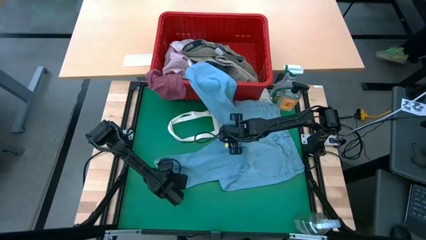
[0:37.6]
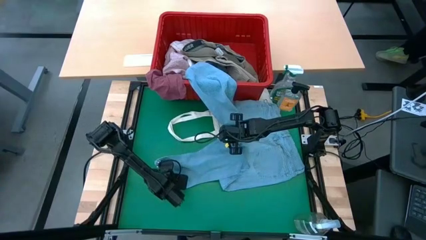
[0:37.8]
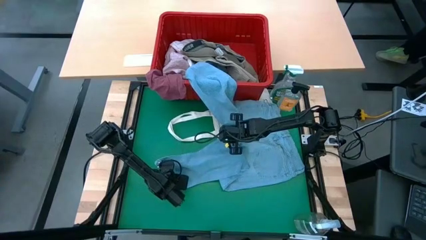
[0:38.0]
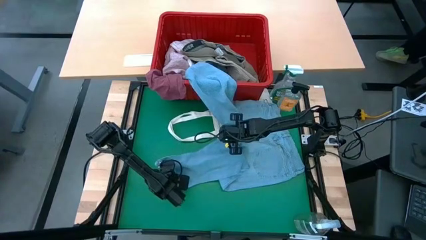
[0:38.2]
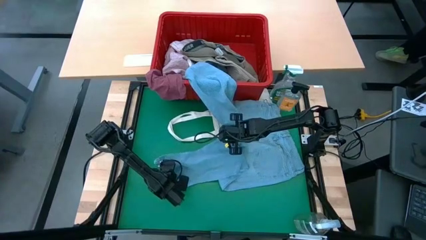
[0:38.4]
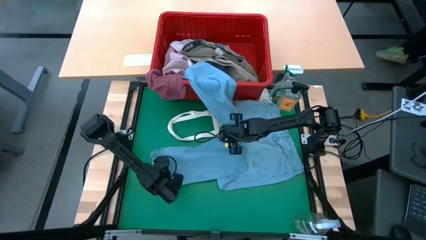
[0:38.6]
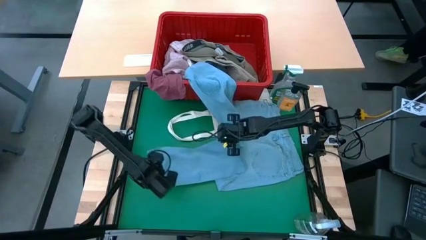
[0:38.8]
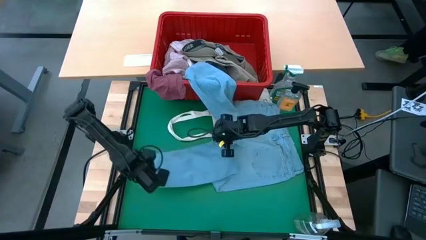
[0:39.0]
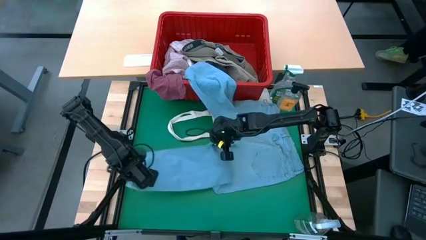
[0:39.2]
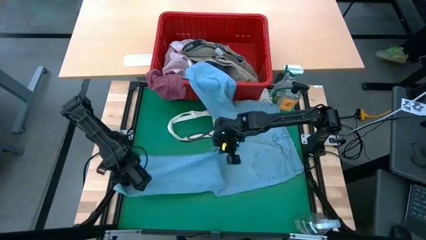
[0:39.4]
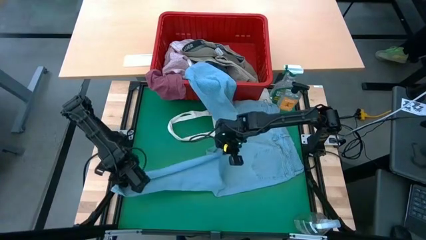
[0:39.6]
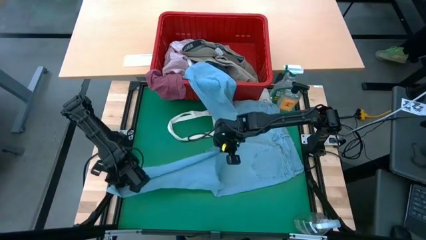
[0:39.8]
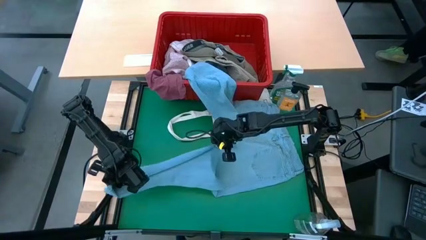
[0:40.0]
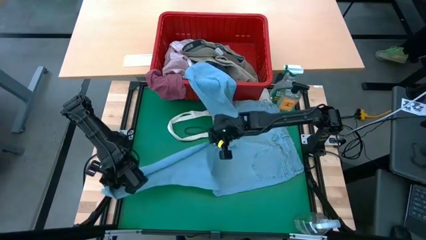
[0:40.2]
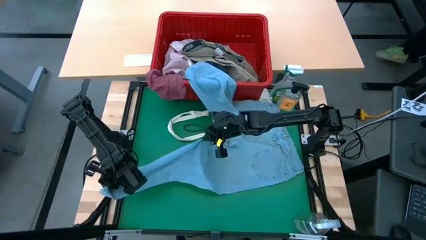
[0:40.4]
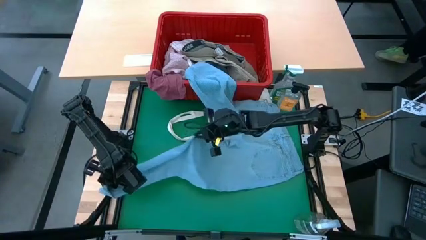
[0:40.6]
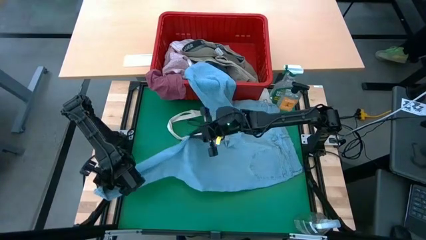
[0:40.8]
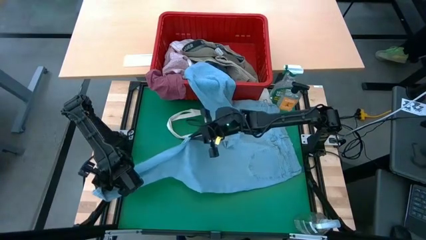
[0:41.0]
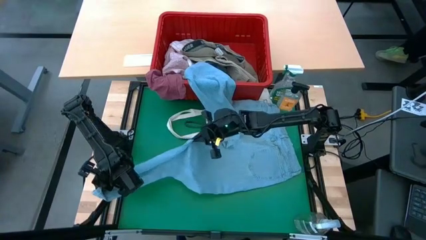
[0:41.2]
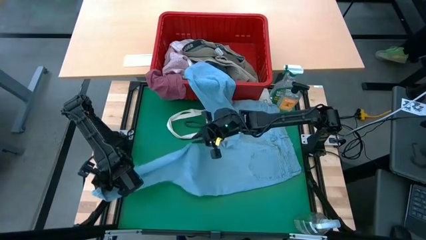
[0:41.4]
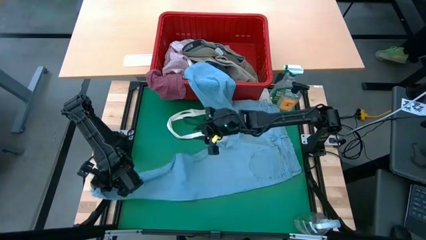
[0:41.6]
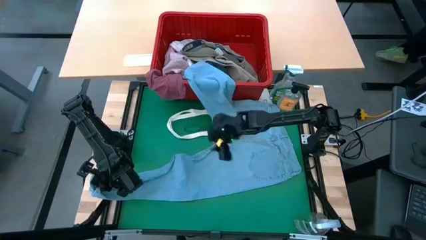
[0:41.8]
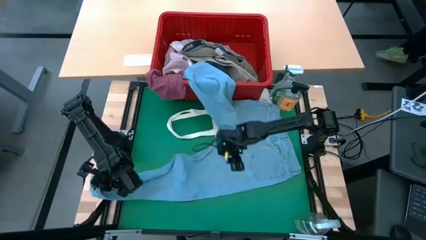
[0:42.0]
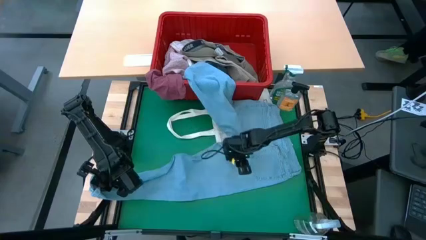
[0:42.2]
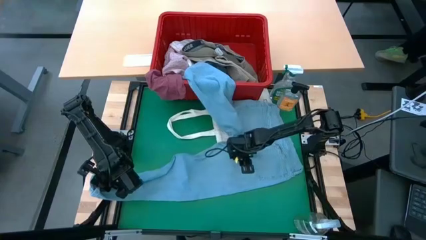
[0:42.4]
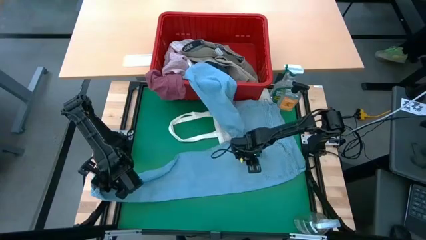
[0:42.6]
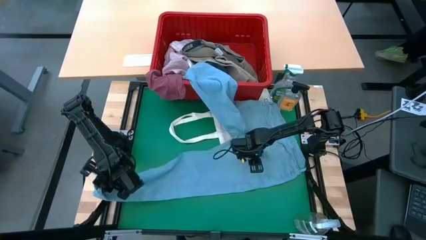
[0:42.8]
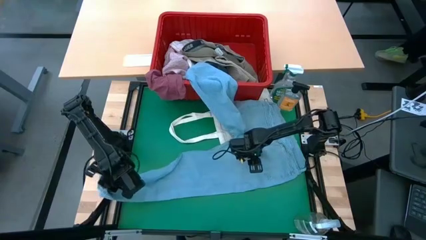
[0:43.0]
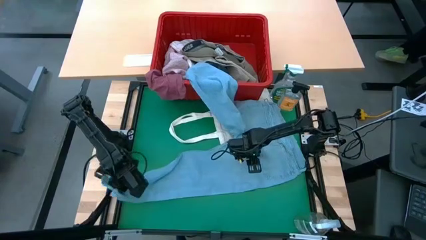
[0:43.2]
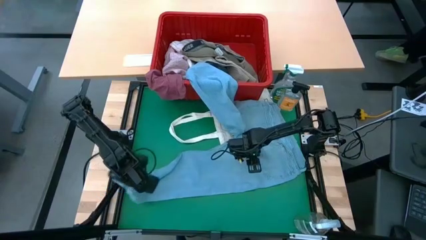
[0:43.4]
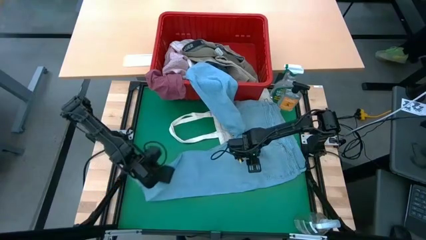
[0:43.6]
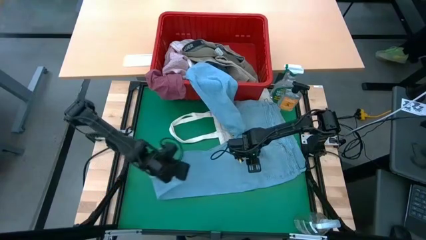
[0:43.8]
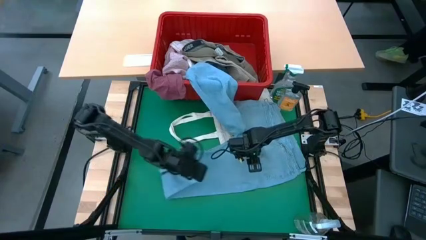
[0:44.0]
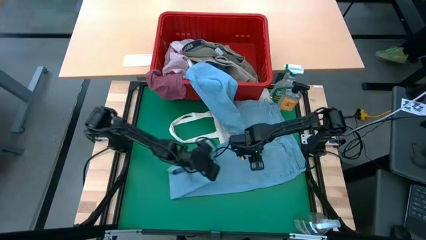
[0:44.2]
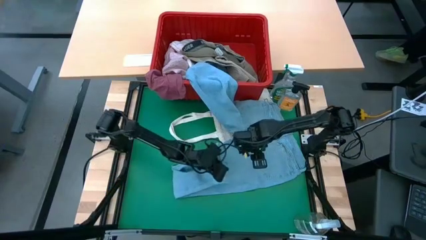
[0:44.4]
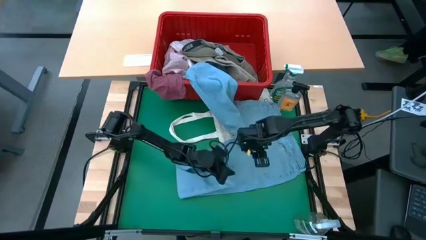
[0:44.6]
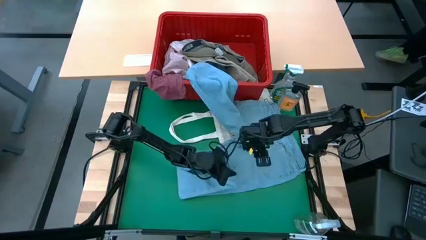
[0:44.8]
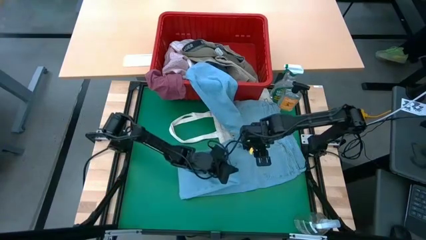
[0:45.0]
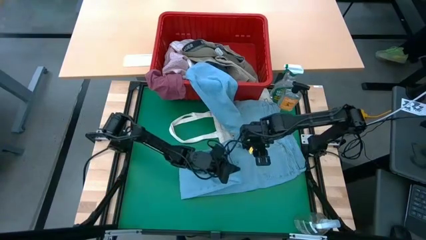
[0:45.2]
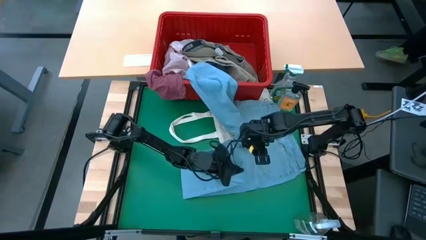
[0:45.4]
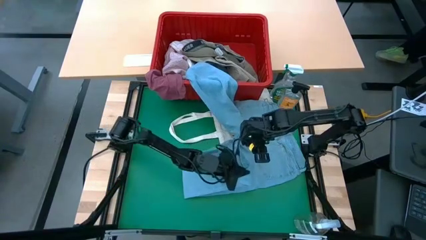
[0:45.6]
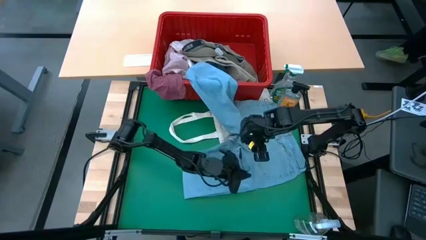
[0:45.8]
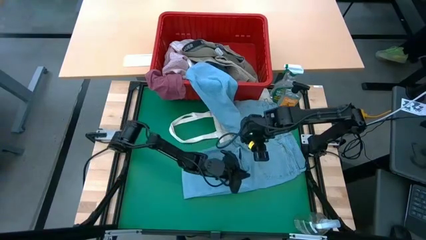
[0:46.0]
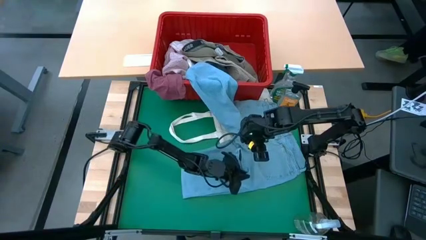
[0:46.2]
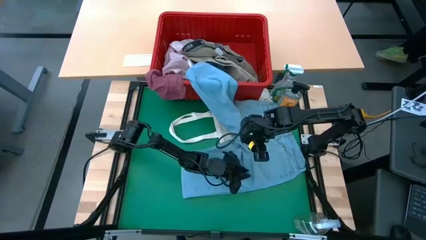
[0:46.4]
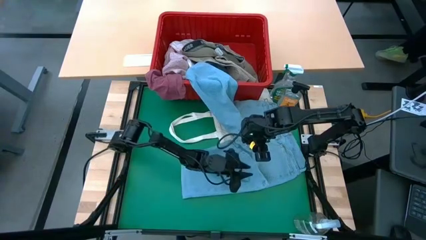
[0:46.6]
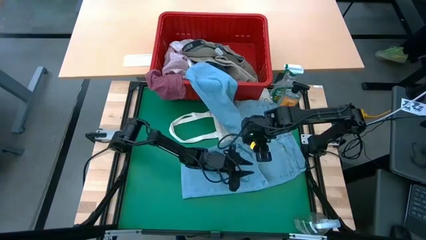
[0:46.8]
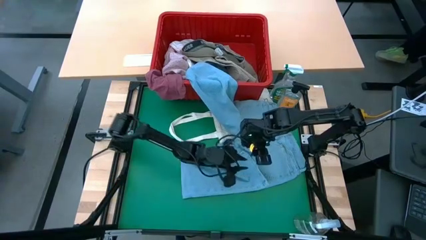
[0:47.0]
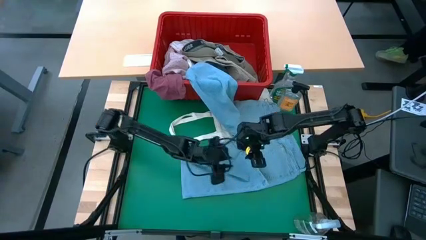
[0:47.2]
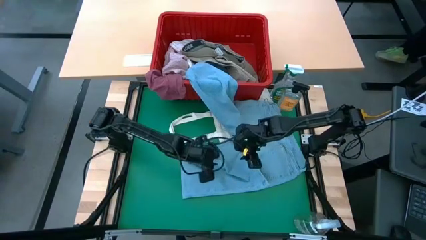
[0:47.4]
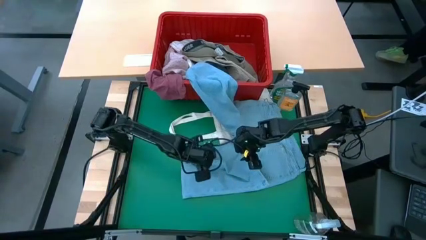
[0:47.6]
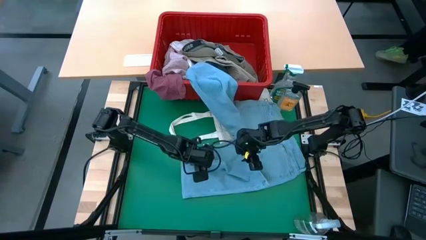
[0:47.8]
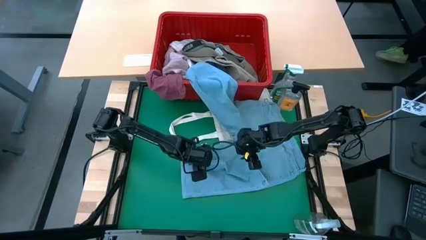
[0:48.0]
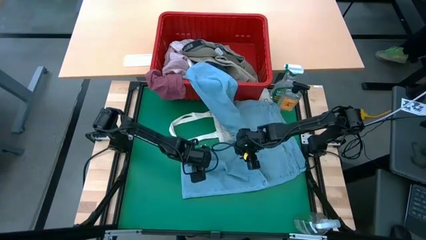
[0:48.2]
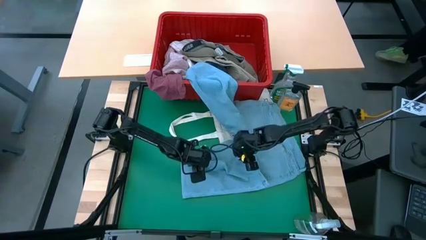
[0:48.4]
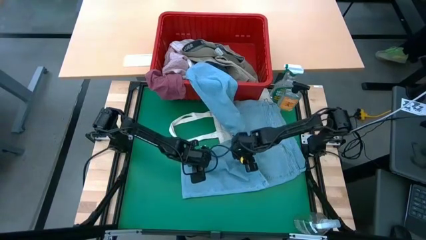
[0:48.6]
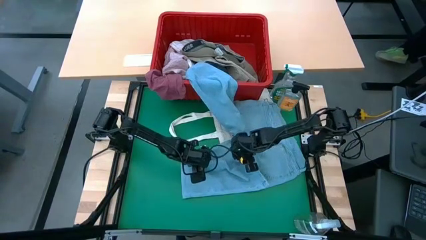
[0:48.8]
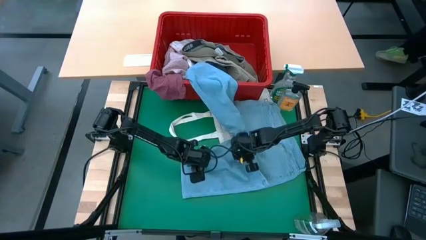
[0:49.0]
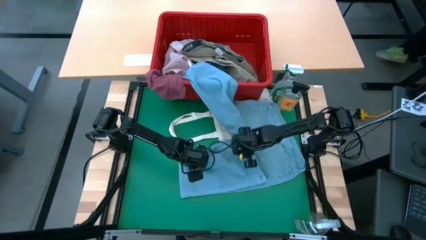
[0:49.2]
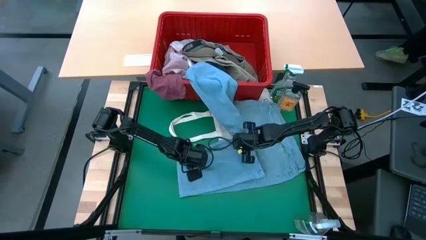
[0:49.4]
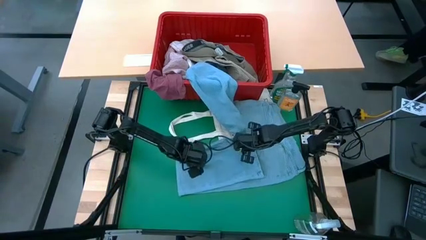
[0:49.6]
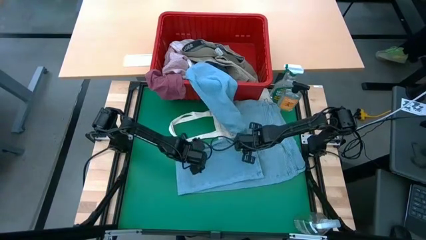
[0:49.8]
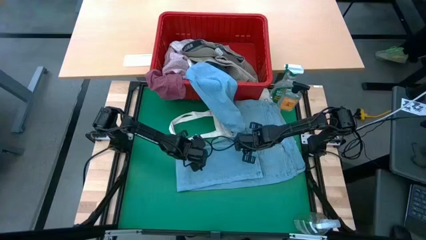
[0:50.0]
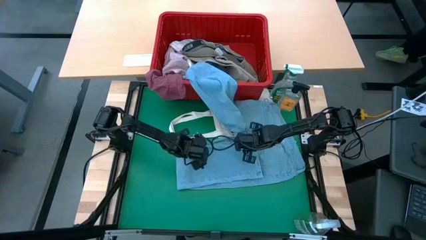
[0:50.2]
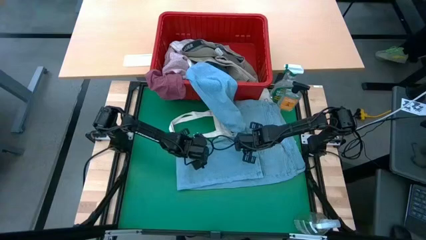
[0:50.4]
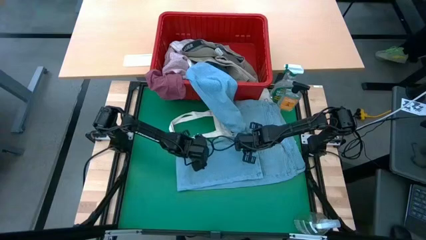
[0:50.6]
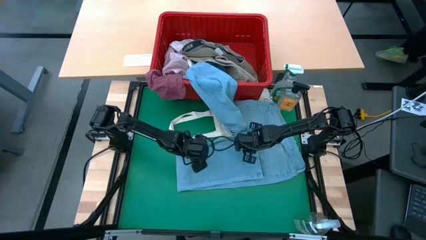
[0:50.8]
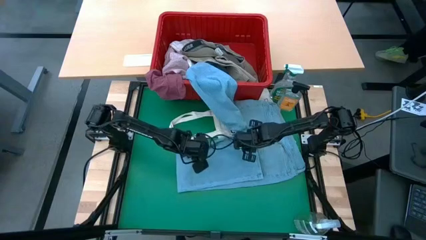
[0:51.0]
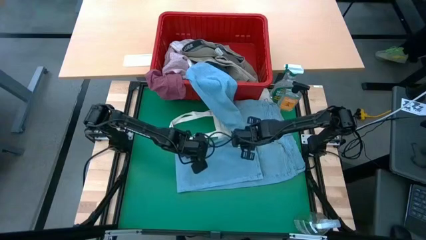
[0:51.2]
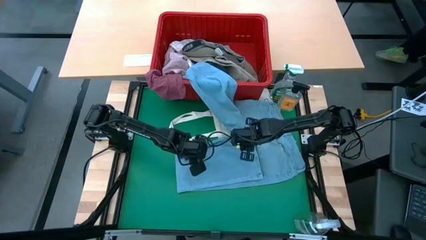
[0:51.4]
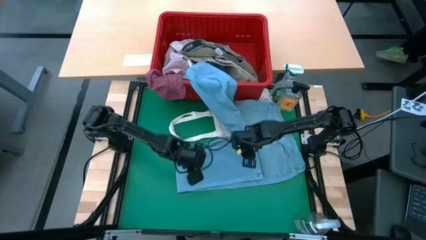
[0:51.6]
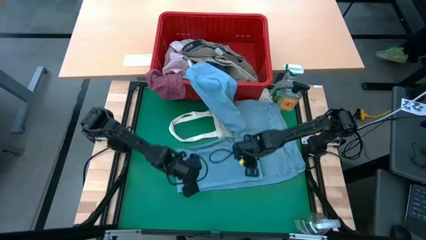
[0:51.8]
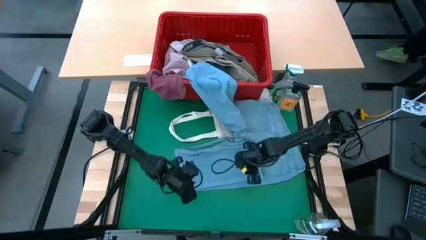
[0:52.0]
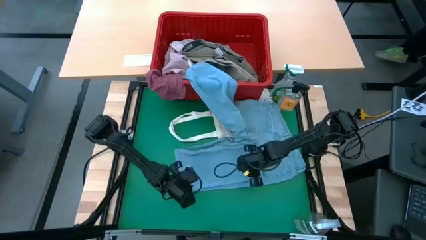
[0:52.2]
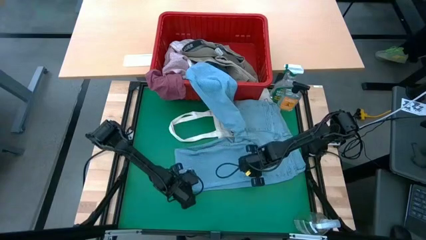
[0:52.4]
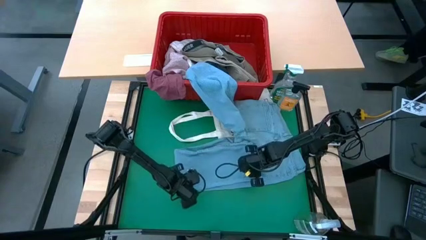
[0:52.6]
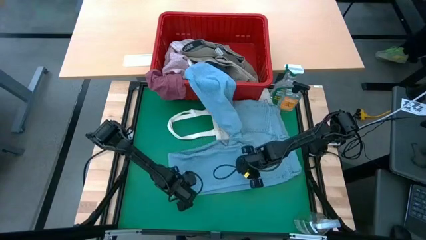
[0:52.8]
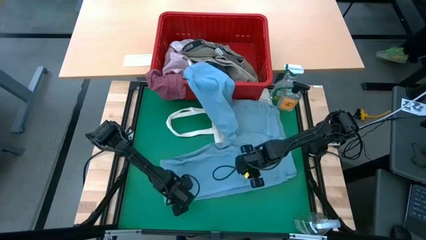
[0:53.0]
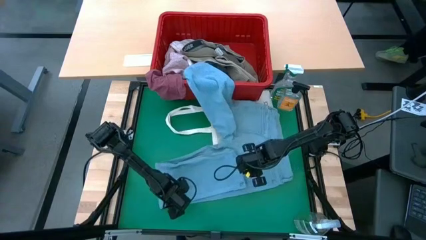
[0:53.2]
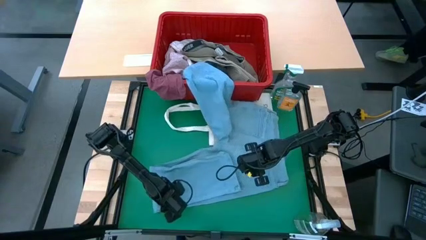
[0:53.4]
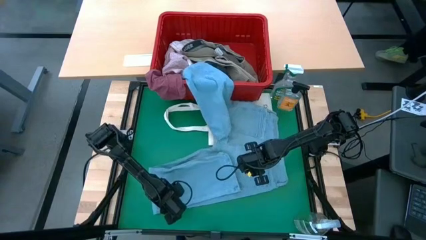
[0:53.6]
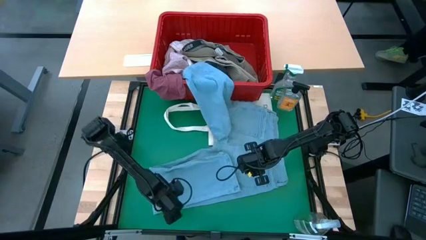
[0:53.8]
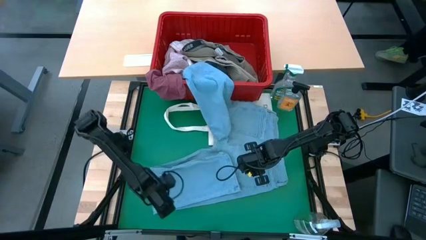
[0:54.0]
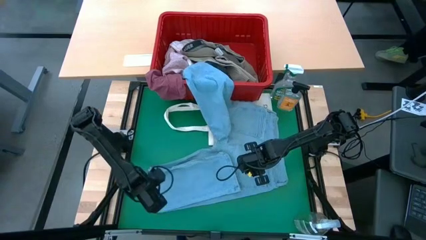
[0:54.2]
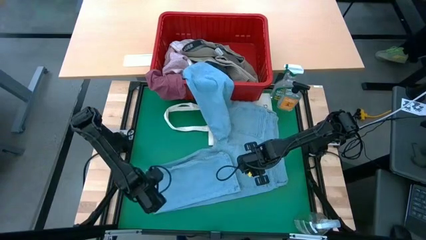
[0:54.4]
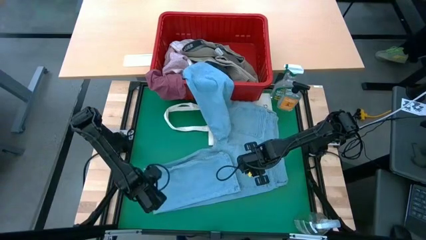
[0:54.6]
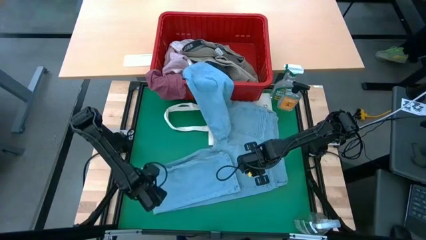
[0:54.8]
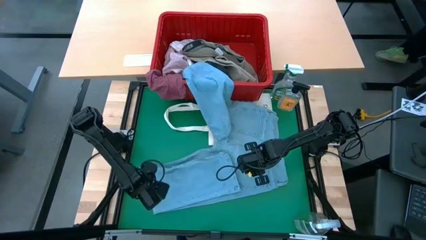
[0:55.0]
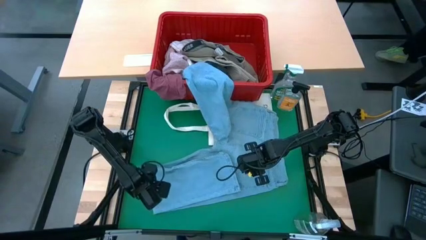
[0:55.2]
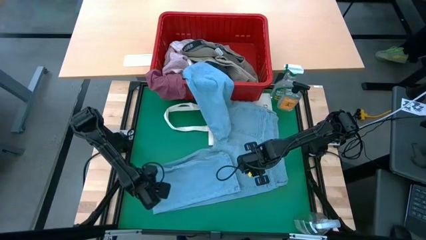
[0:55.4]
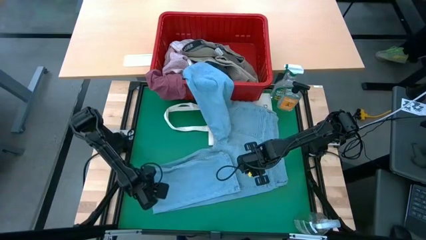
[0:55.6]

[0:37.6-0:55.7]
Task: Fold Laundry from Bin
Fold the blue pants from the red laundry basket
